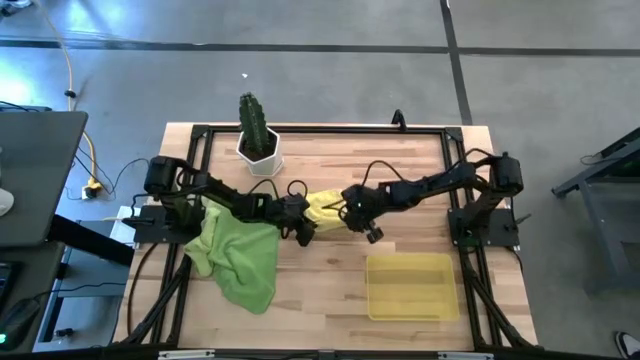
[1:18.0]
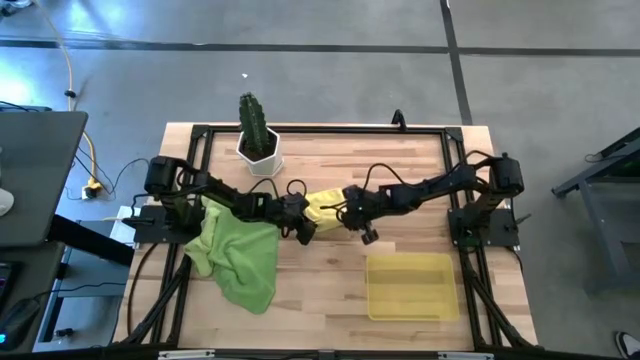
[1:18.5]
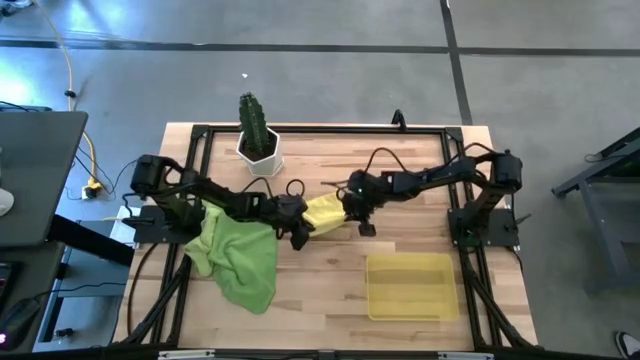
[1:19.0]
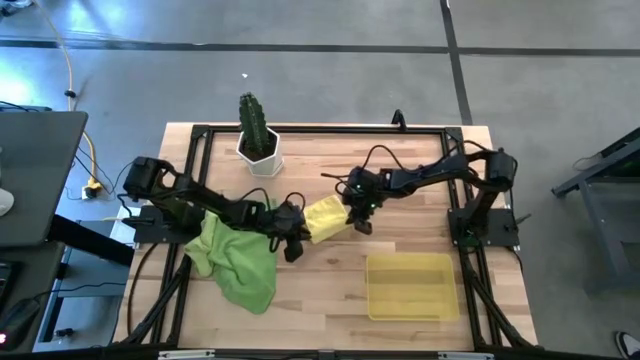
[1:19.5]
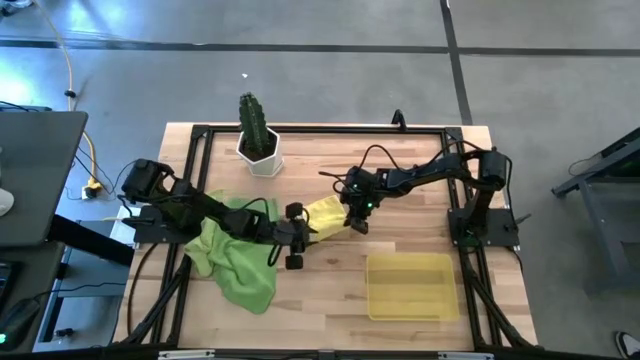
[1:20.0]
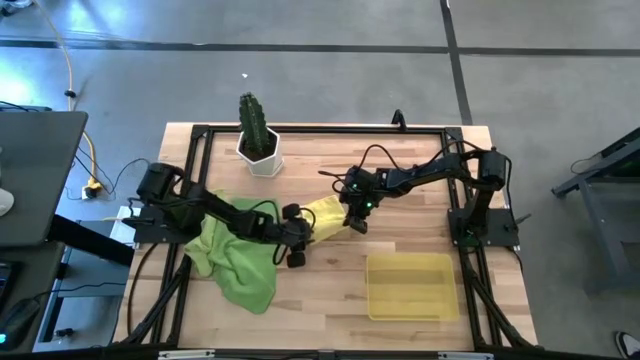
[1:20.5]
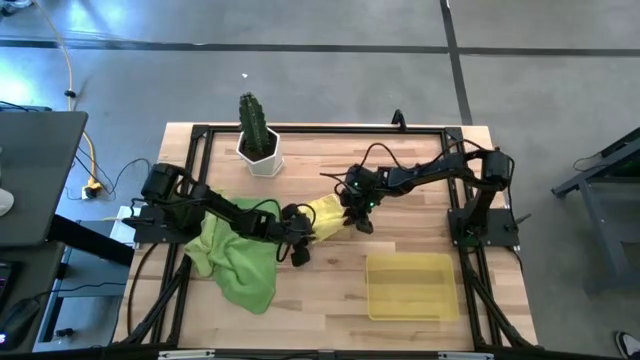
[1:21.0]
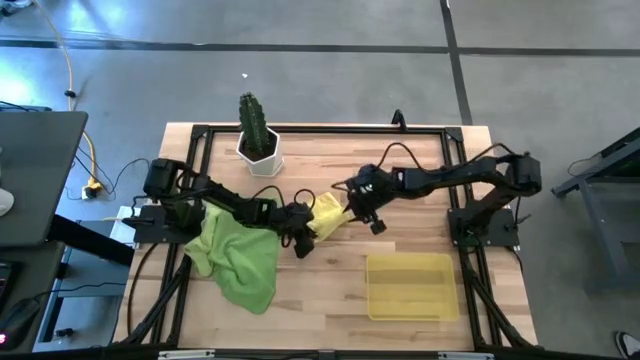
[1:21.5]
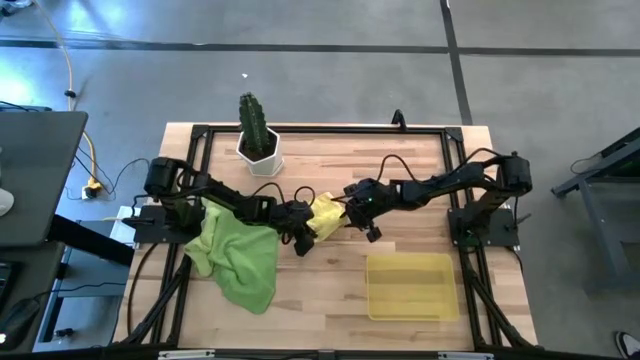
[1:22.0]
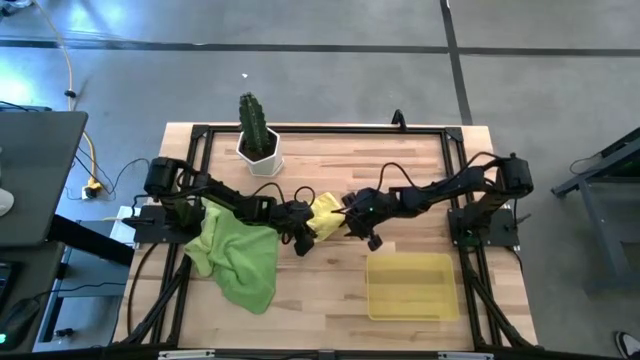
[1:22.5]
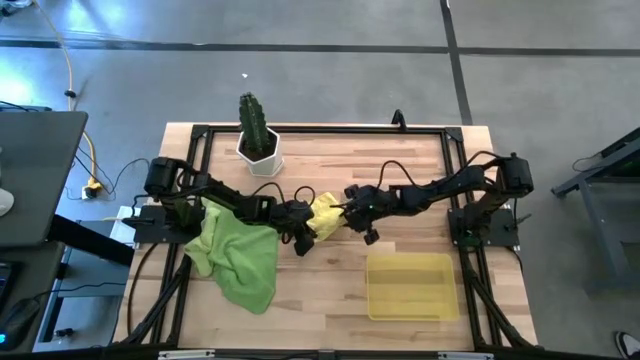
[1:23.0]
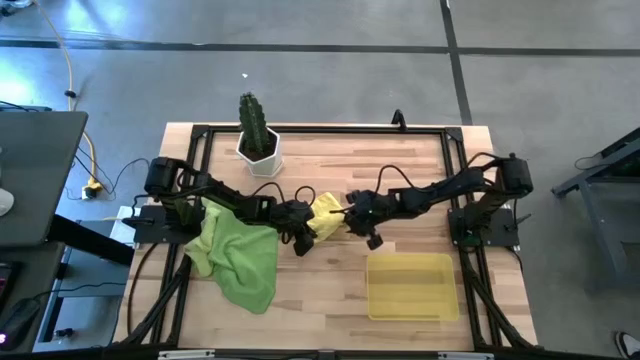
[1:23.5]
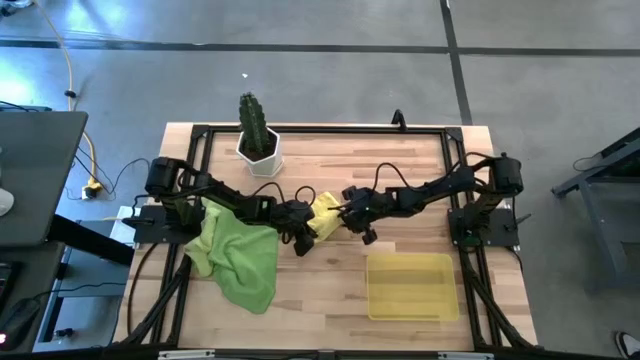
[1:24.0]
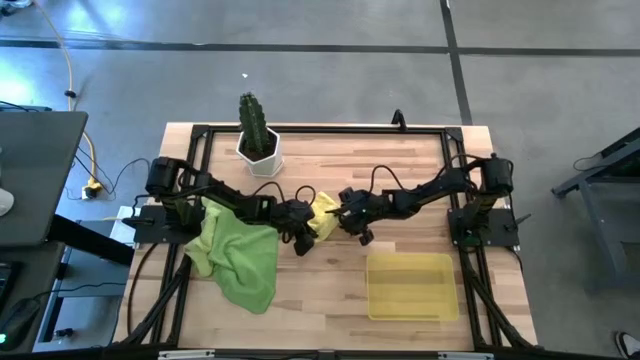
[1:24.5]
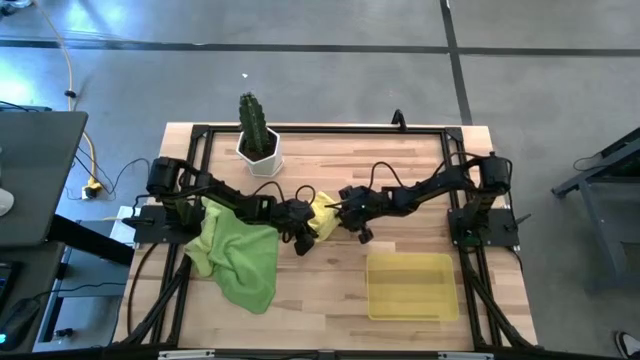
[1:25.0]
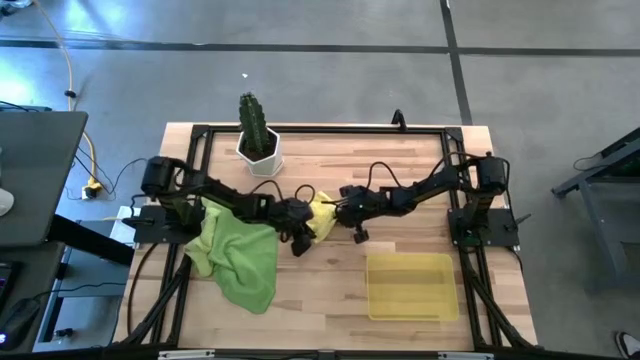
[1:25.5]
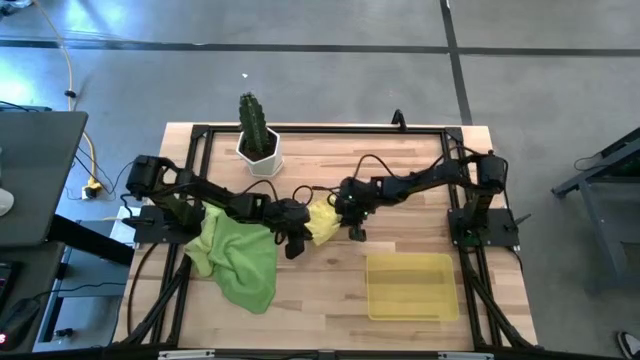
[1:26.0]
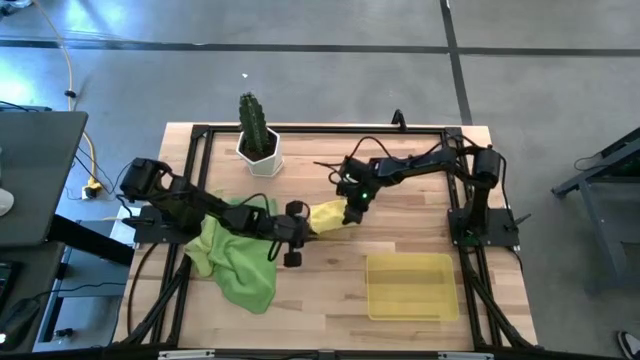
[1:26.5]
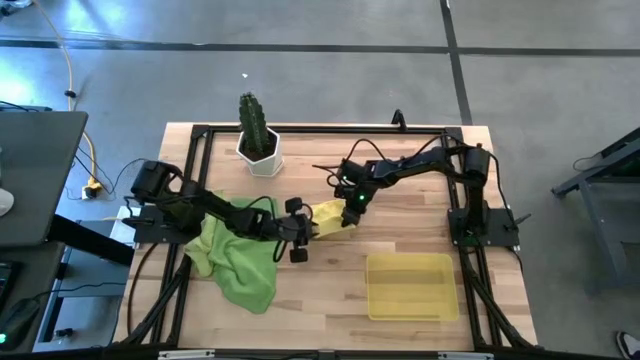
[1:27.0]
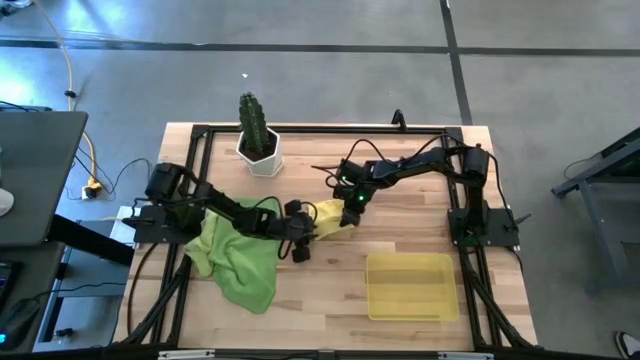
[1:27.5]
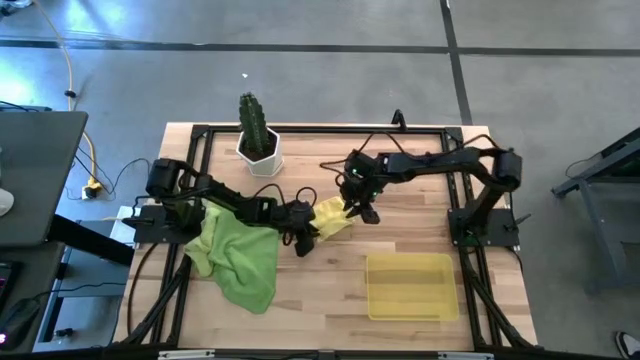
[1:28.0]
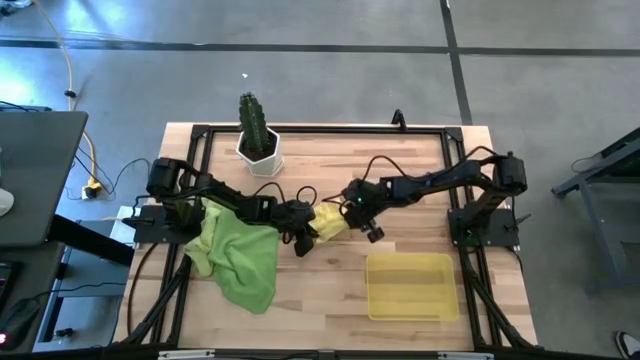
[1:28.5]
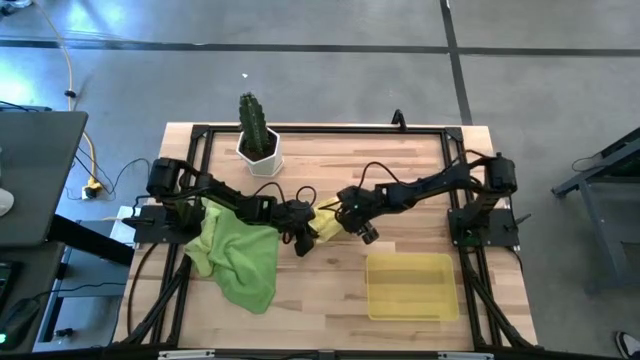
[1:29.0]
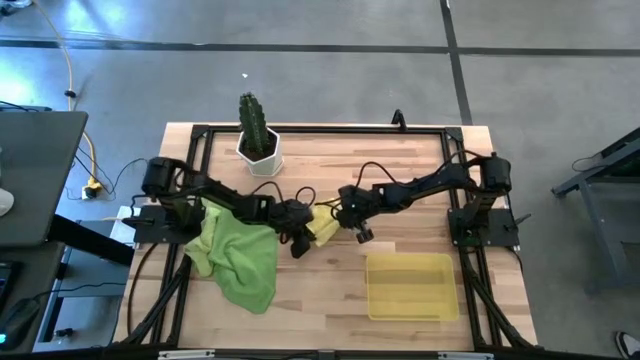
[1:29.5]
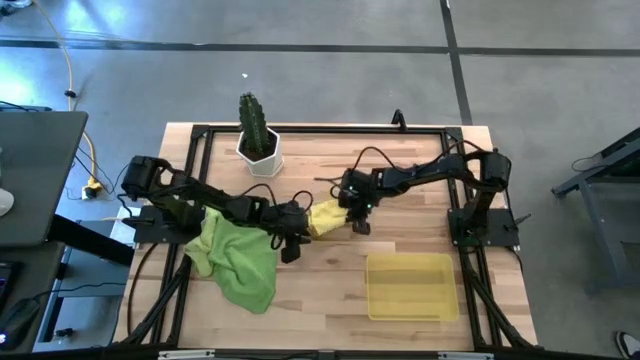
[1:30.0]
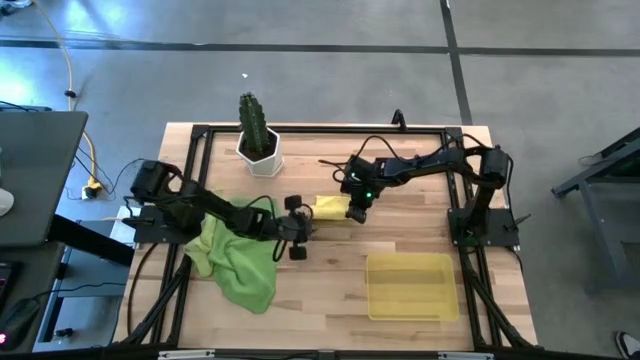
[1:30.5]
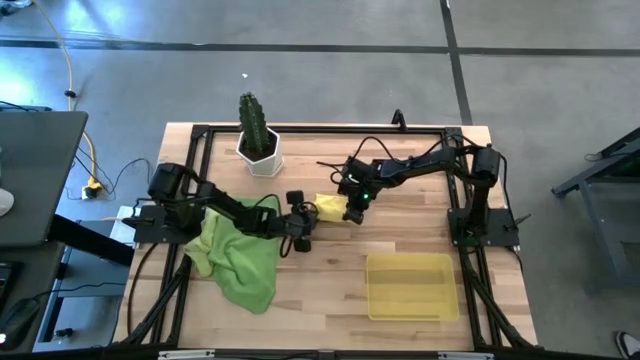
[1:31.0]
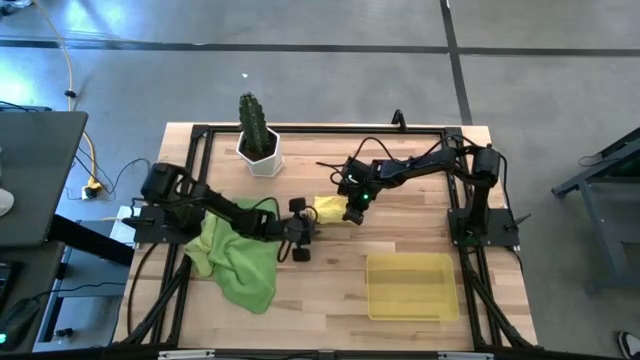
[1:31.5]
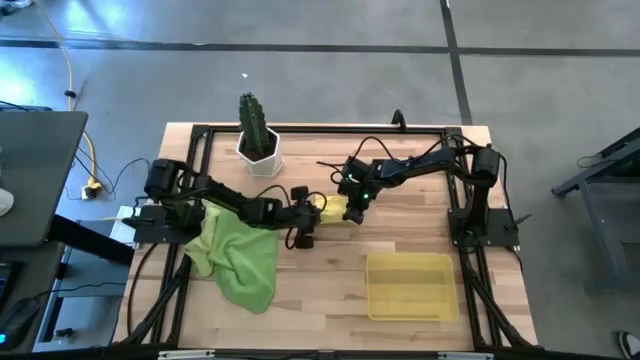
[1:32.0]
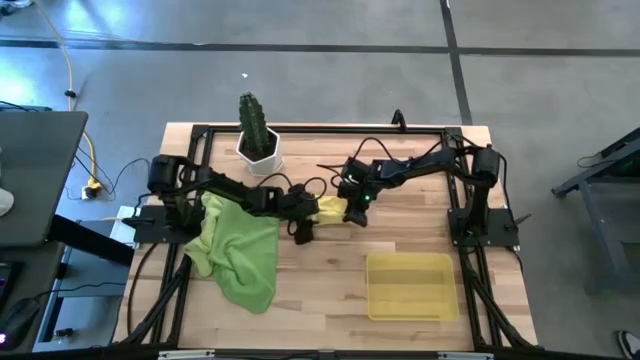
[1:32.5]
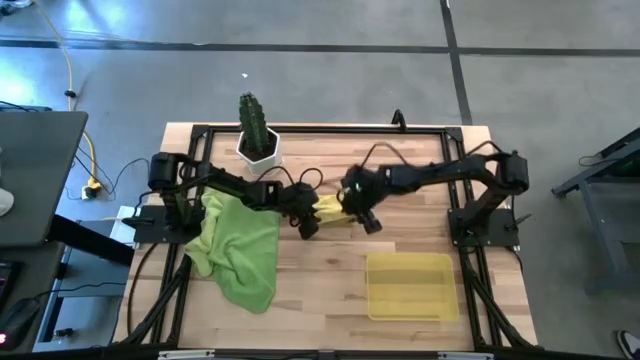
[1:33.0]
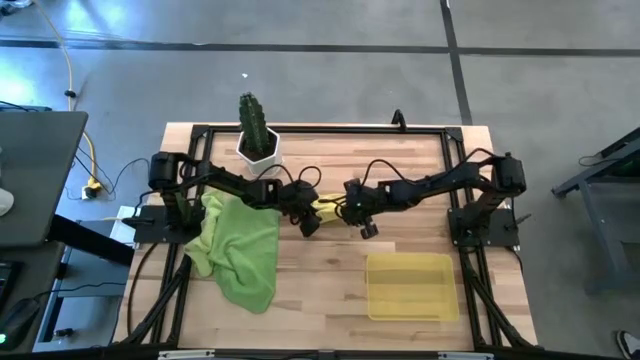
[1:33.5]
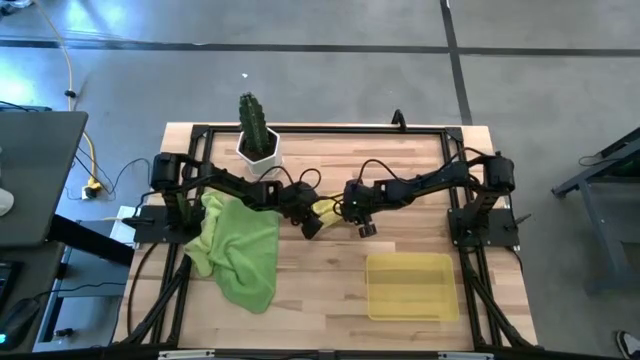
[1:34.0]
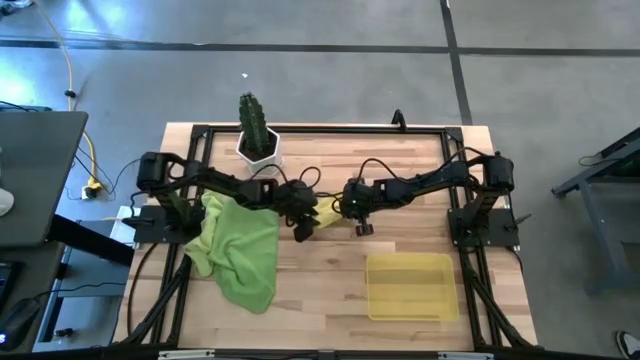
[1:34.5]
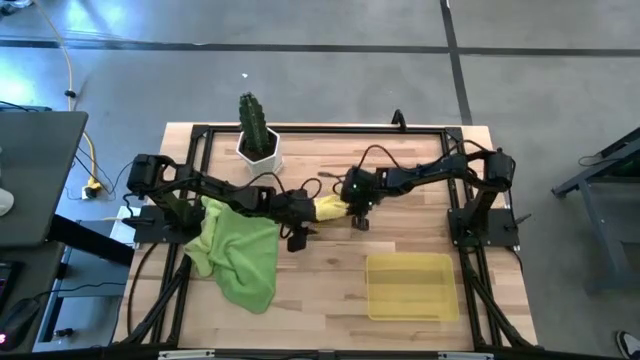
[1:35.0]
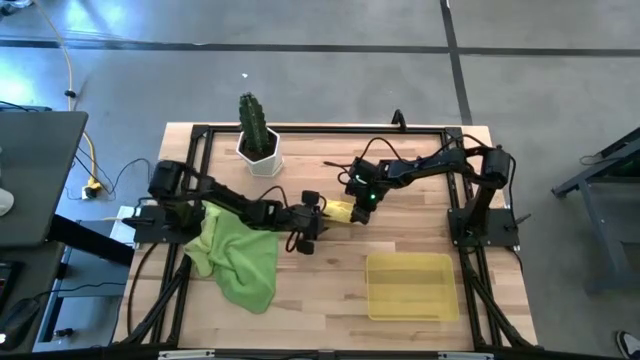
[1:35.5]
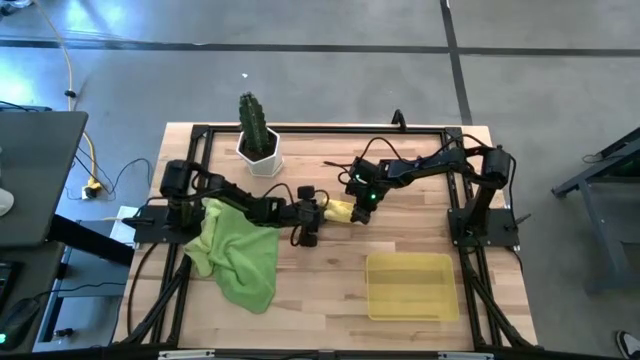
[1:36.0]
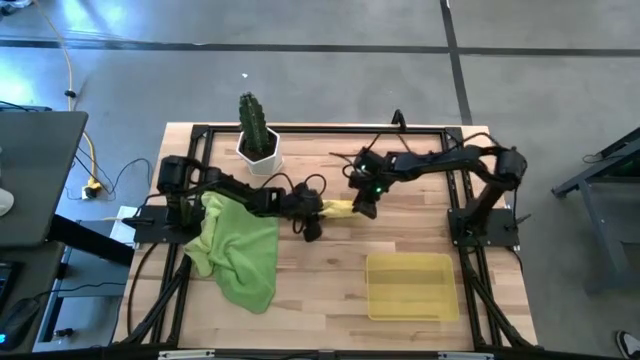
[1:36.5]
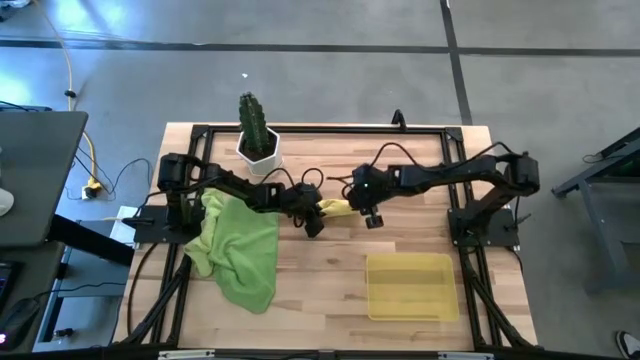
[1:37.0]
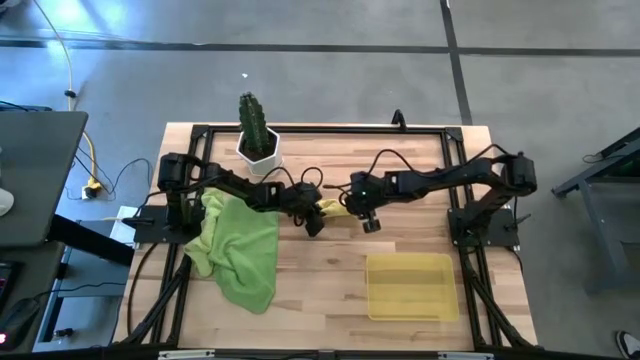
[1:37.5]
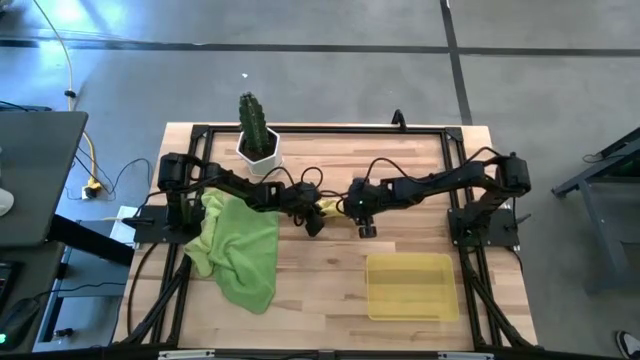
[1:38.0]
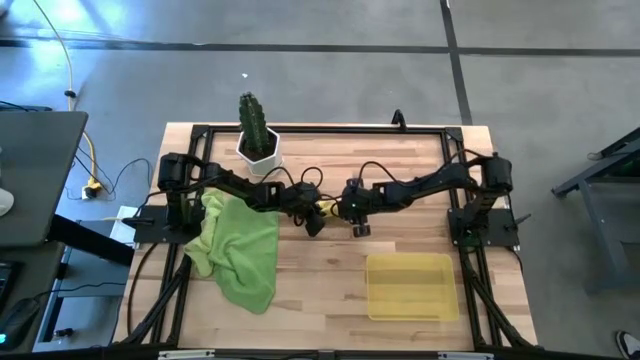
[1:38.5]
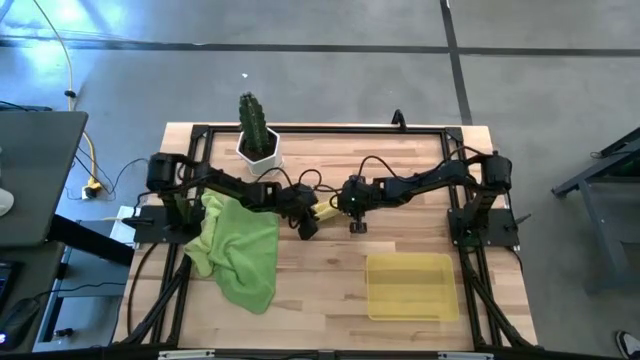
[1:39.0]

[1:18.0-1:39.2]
Task: Roll microfiber towels into tight, uniform cylinder then place into a basket
Roll the yellow towel

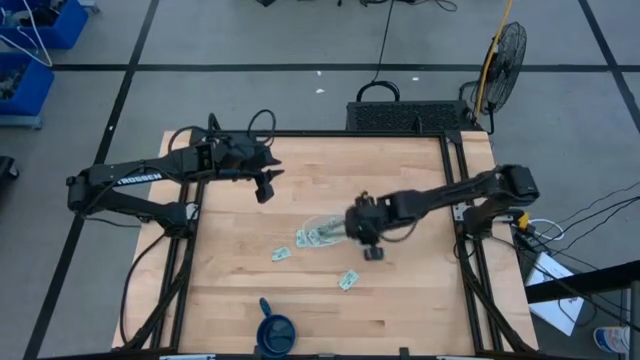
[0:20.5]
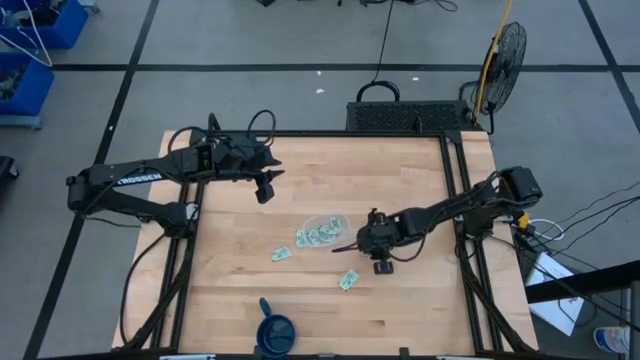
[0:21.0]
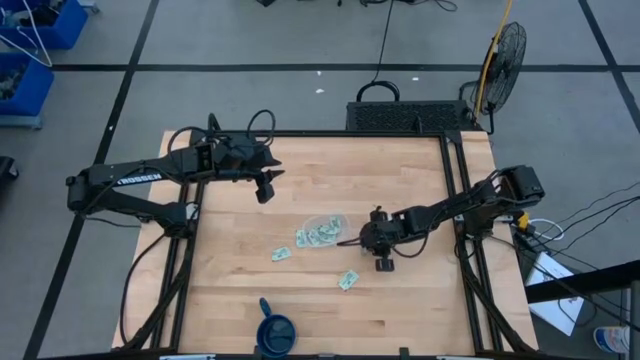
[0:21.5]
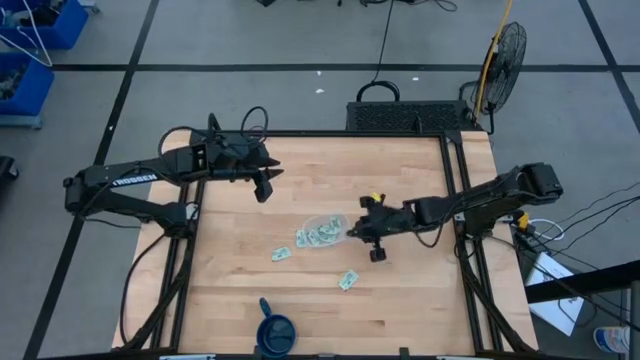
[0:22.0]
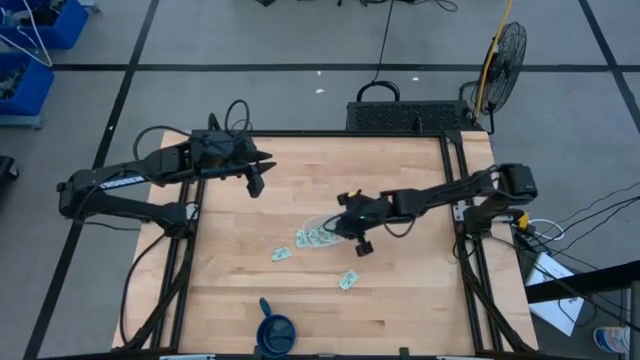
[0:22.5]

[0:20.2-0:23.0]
Task: Pick and place Stevia / Truvia into bins
Put the stevia packet into the transparent container
